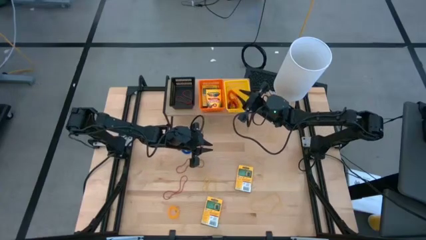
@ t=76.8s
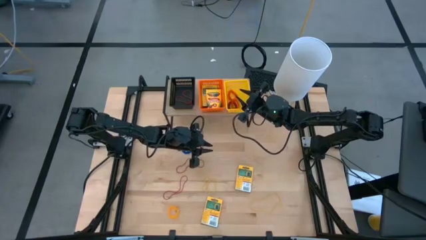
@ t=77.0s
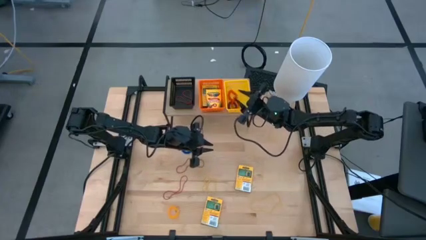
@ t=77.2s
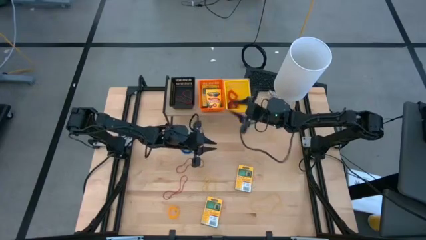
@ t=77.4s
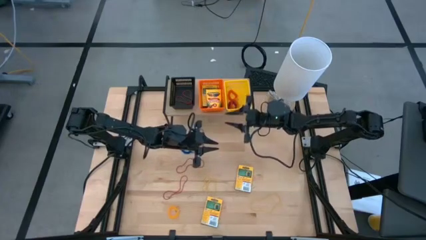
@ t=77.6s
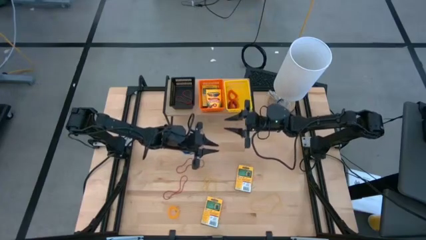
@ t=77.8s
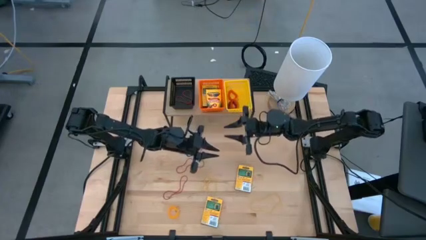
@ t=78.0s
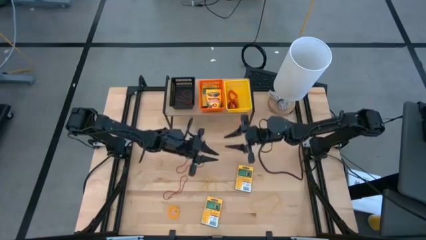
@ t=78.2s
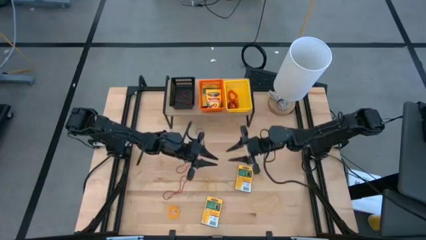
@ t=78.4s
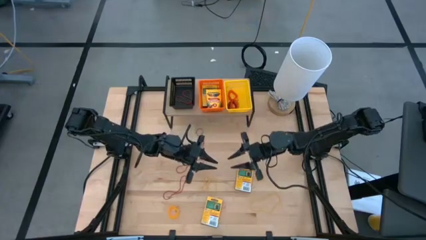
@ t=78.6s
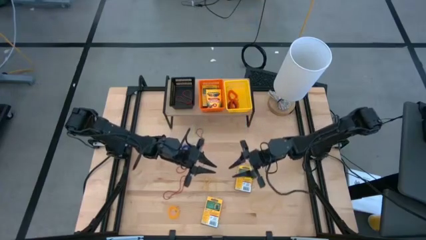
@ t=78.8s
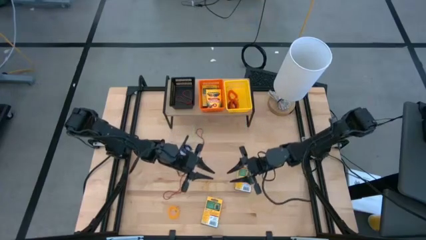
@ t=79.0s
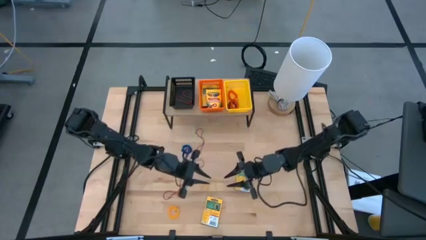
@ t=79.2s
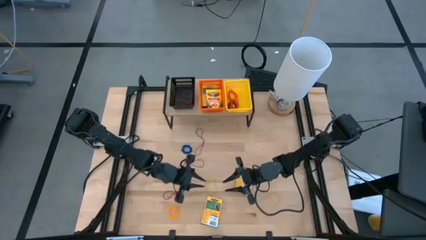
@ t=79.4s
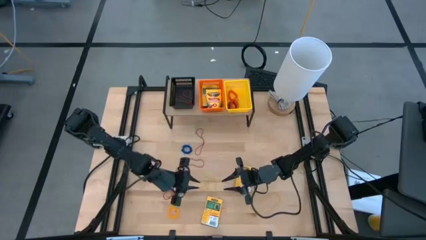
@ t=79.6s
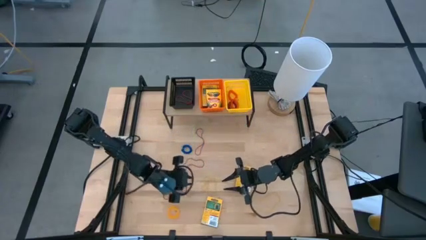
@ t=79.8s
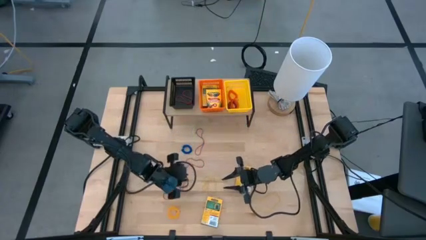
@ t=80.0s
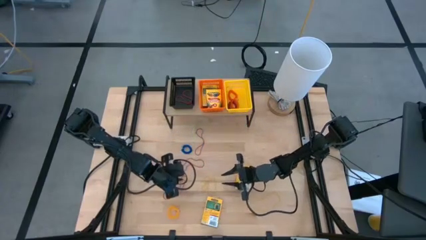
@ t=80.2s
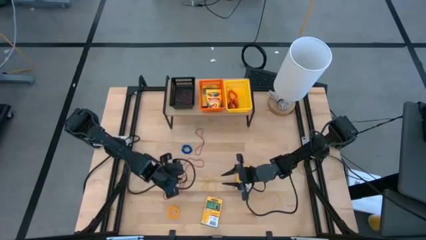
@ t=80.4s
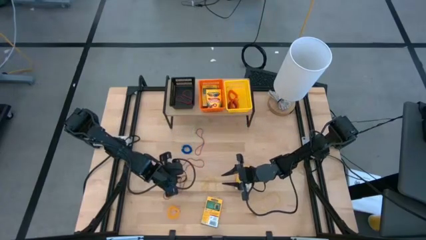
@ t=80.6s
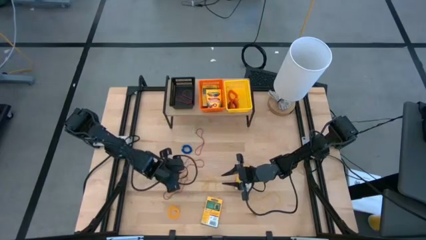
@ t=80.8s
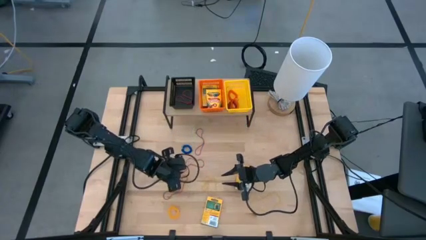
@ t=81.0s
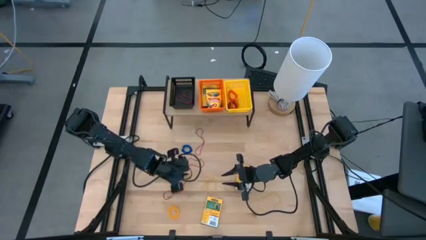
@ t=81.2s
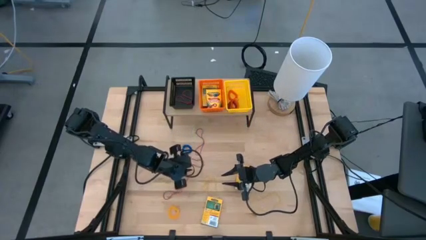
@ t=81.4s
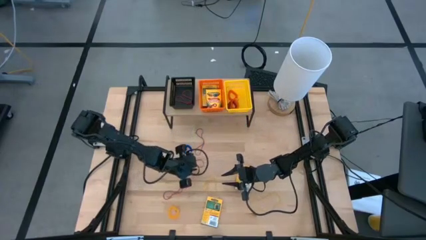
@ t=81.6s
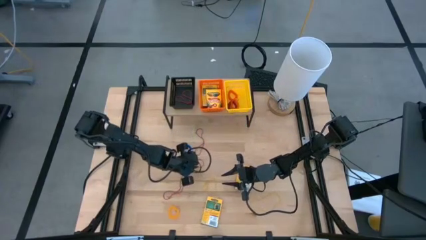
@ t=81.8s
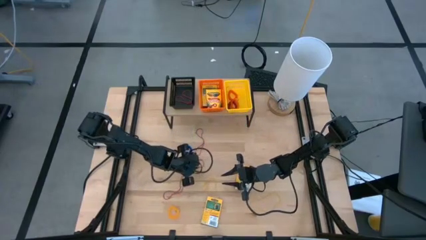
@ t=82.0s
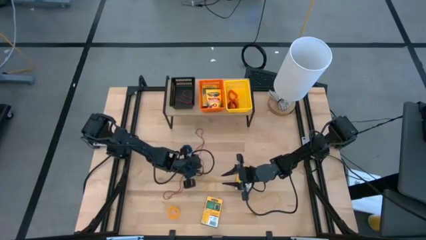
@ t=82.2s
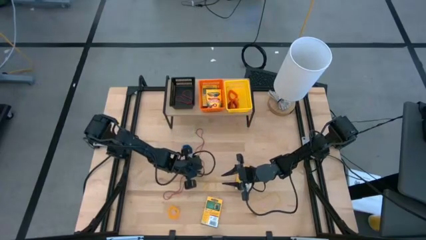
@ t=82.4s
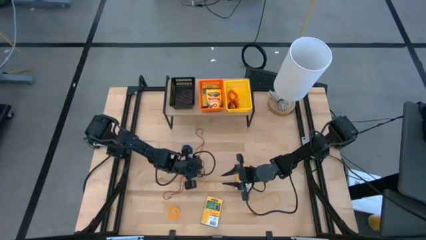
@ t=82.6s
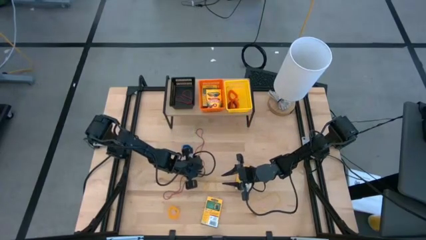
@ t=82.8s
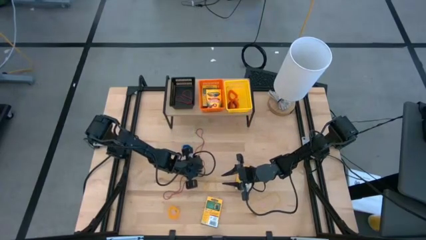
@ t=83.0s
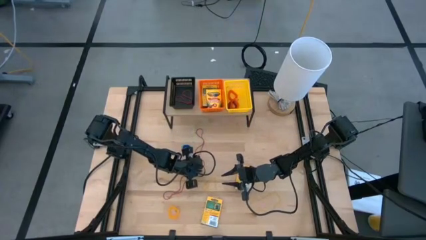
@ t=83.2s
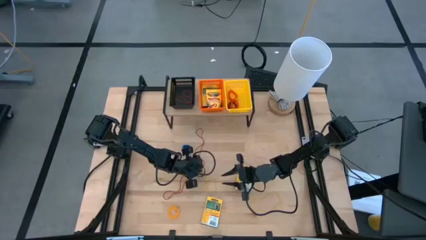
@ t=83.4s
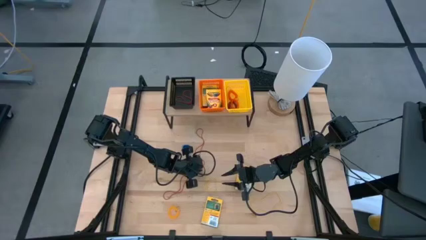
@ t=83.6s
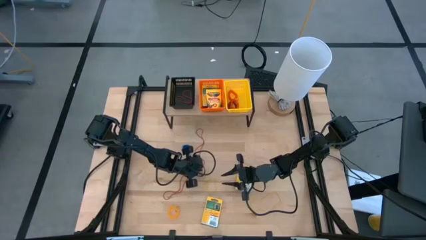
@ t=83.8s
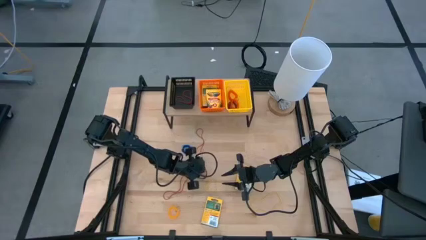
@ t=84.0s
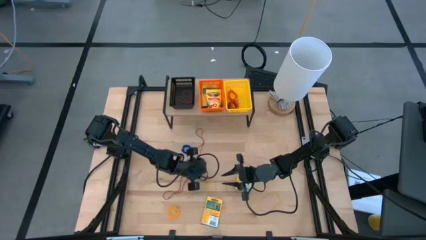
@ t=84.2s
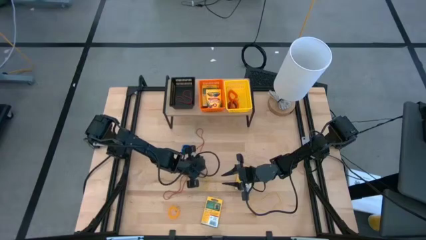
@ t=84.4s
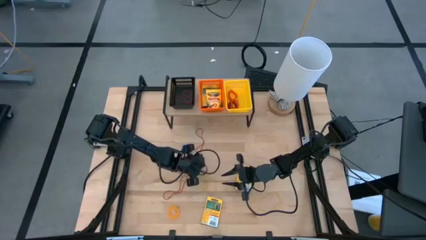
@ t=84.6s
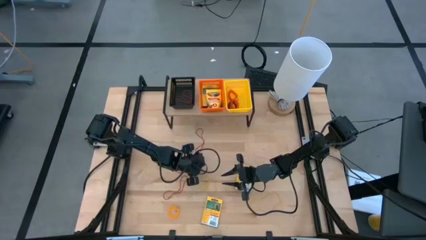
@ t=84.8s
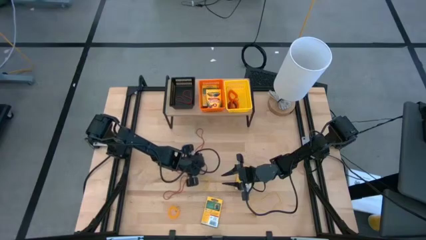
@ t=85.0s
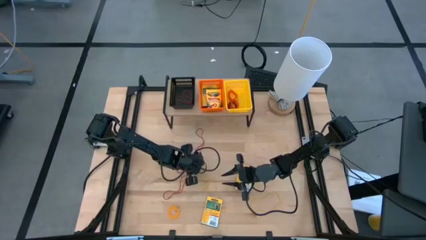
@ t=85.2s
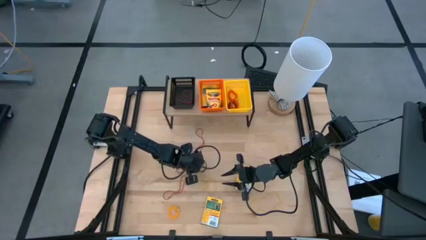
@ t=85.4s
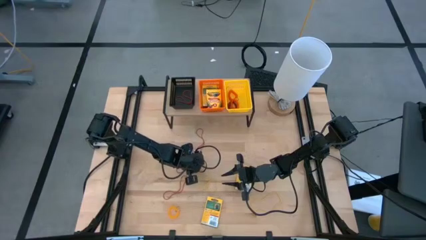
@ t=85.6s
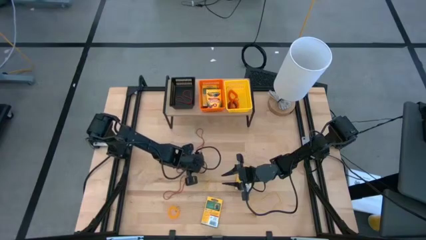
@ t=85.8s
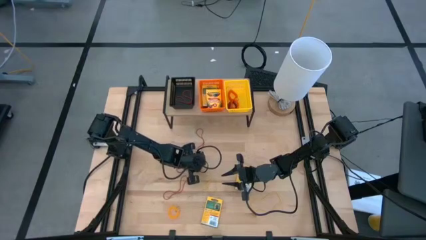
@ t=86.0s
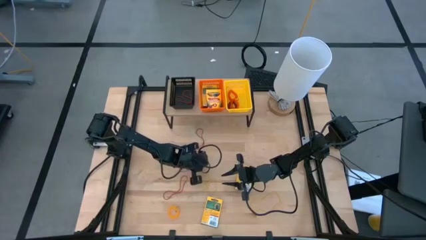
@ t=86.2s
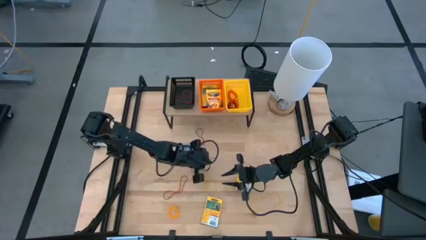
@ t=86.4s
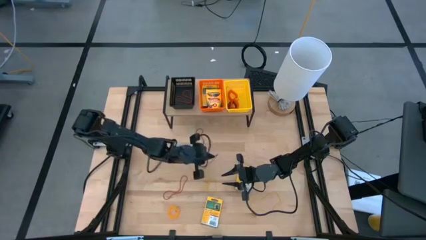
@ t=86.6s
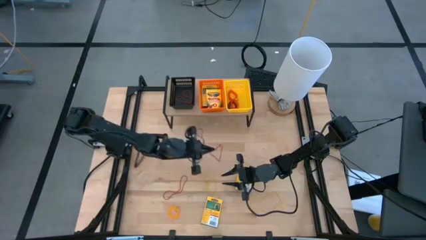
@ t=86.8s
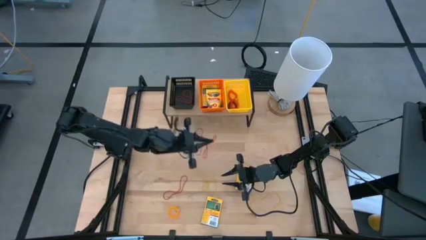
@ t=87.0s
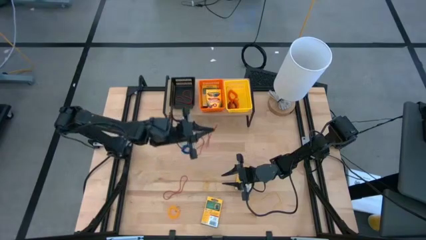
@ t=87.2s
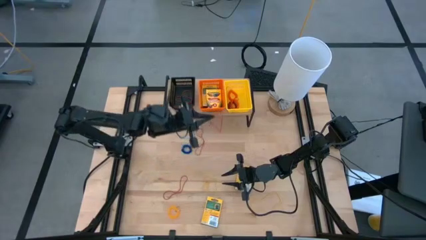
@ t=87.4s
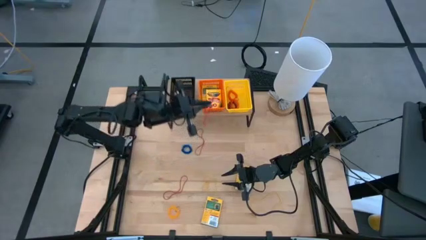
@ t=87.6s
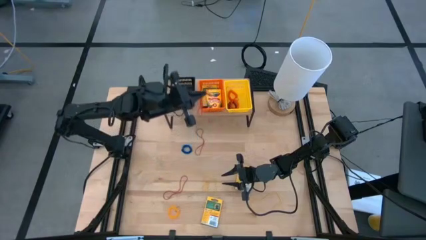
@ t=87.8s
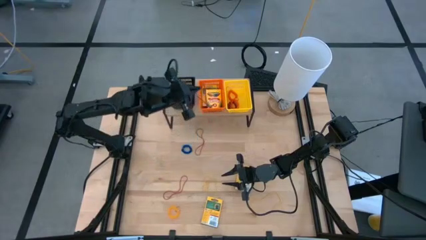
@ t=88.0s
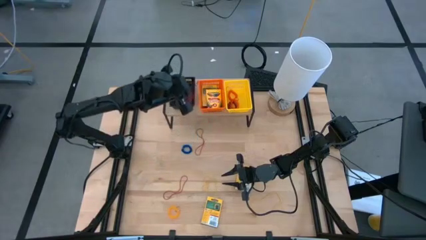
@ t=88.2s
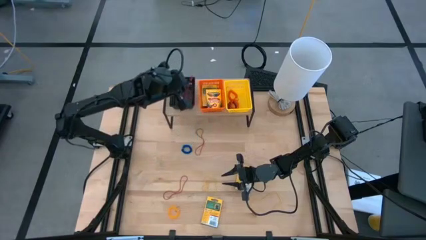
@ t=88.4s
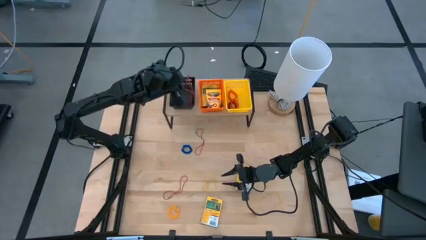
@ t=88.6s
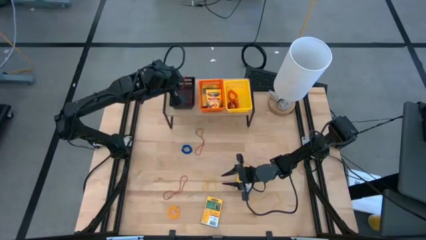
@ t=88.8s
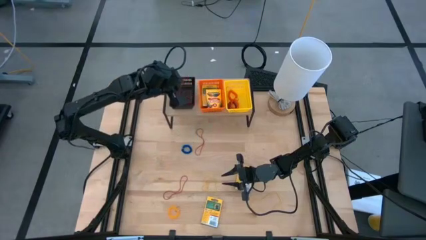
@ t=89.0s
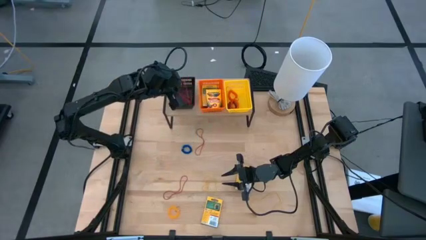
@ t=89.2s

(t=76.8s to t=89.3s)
Task: Pick & Place Office Desk Supplies
Put the red rubberband into the black bin on the shelf
